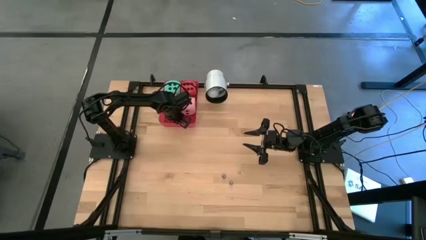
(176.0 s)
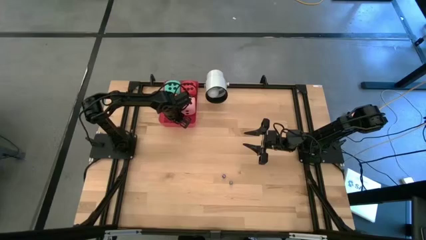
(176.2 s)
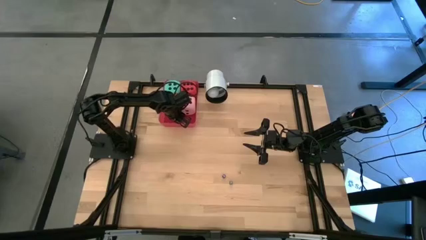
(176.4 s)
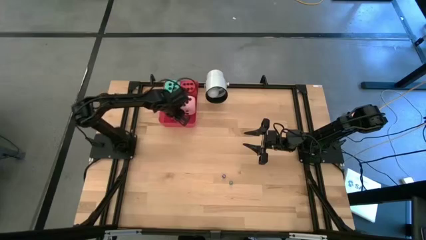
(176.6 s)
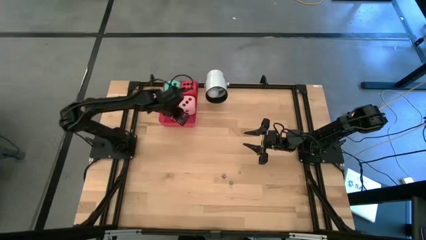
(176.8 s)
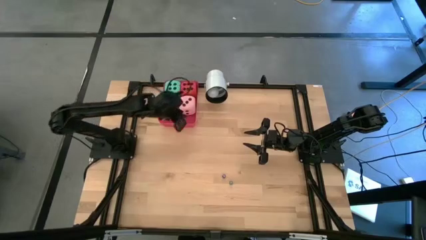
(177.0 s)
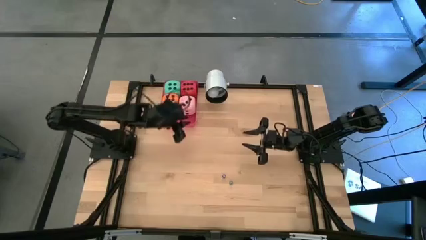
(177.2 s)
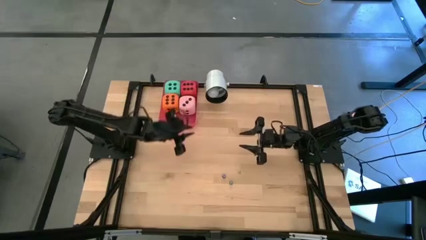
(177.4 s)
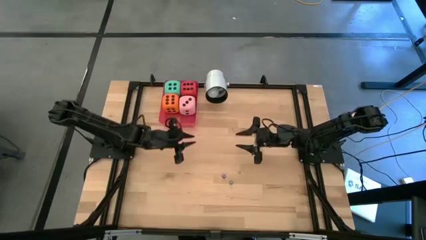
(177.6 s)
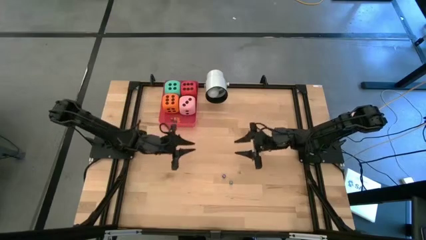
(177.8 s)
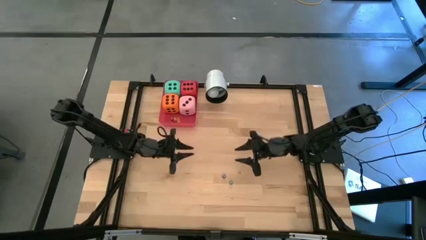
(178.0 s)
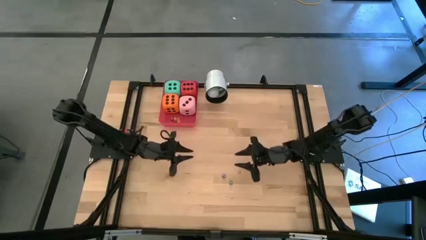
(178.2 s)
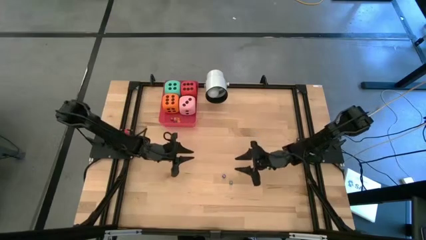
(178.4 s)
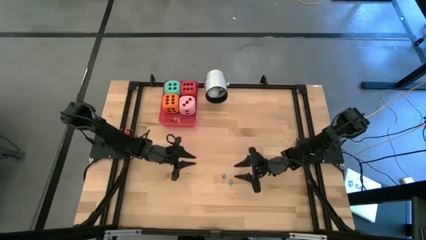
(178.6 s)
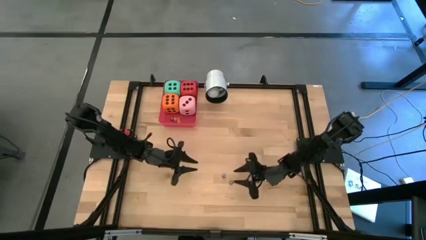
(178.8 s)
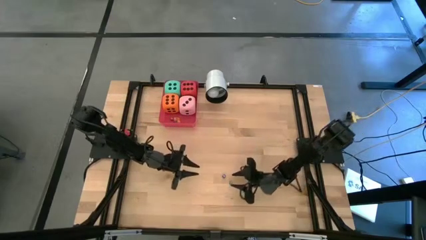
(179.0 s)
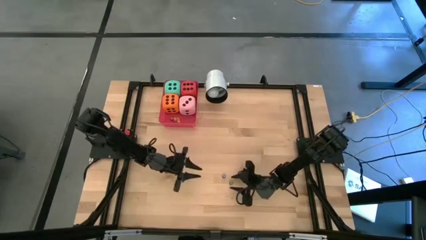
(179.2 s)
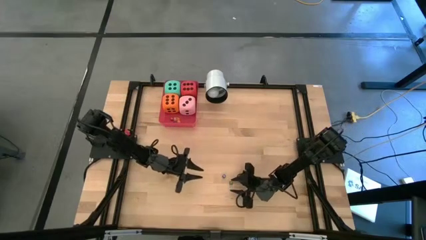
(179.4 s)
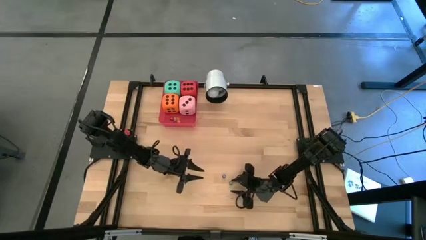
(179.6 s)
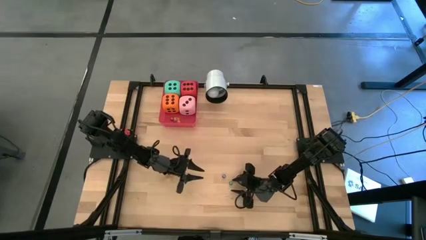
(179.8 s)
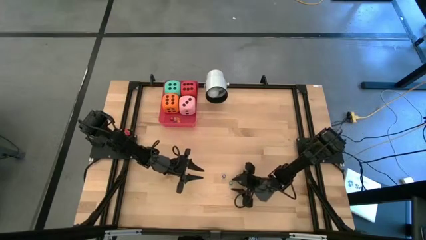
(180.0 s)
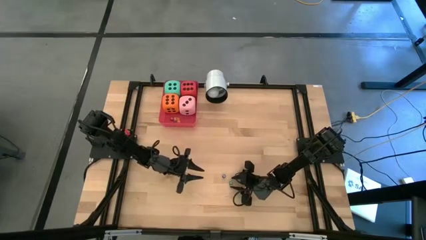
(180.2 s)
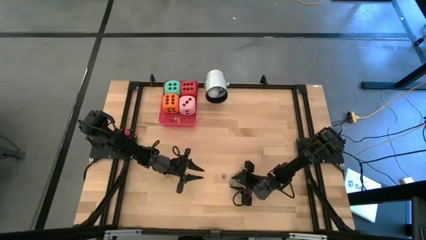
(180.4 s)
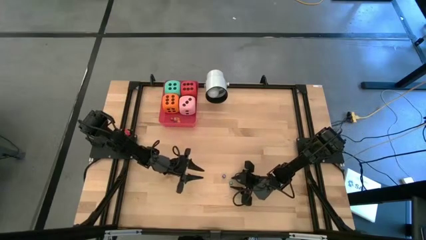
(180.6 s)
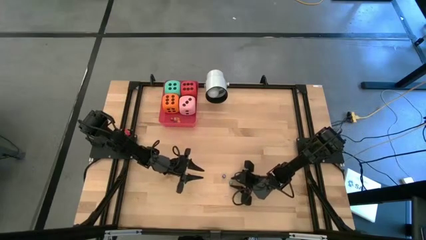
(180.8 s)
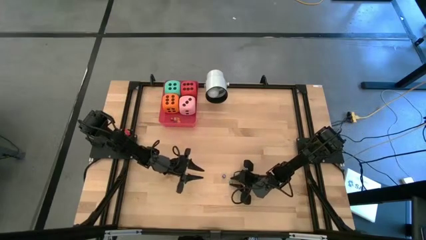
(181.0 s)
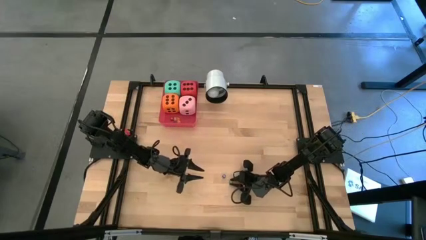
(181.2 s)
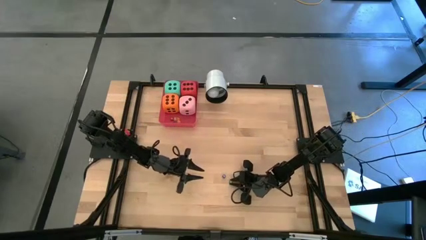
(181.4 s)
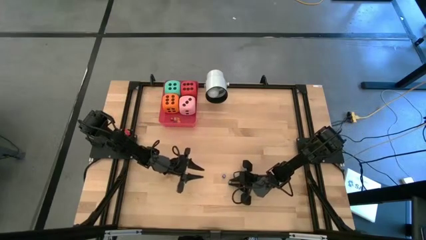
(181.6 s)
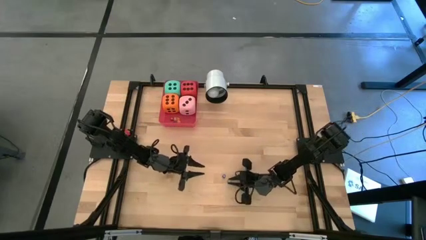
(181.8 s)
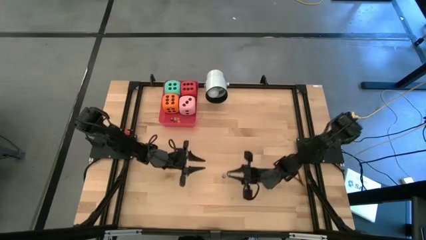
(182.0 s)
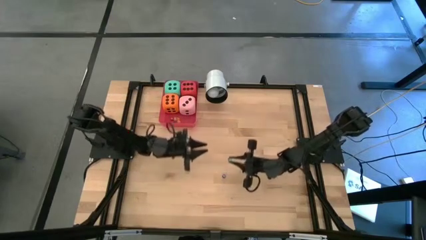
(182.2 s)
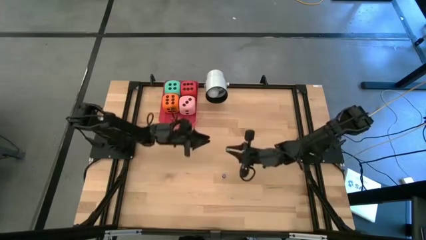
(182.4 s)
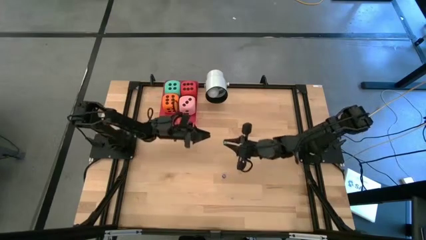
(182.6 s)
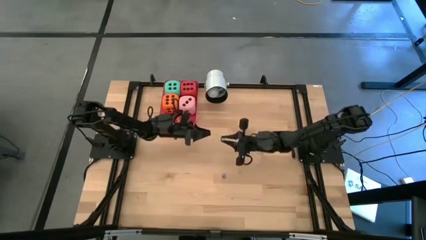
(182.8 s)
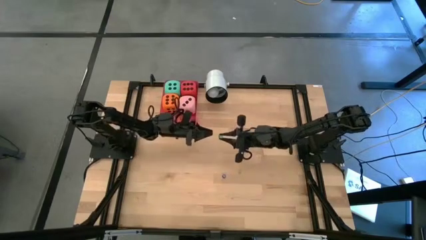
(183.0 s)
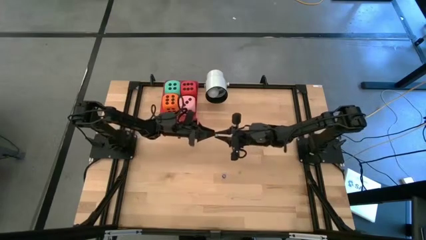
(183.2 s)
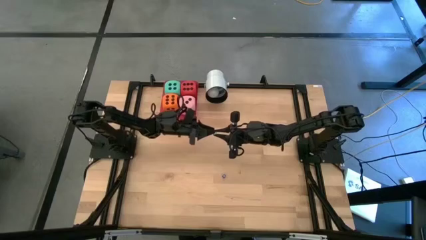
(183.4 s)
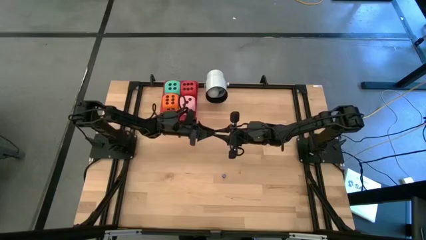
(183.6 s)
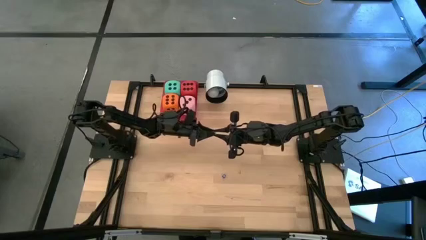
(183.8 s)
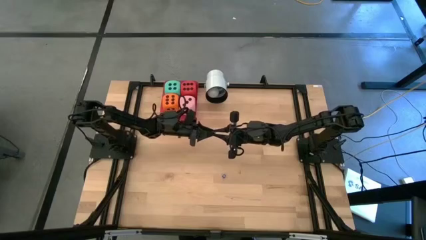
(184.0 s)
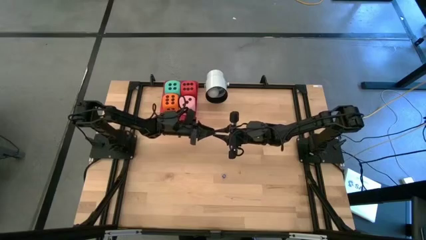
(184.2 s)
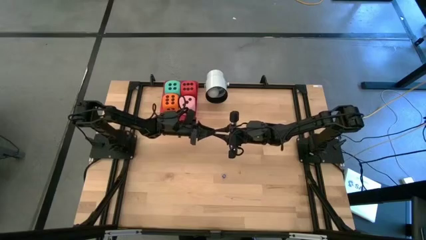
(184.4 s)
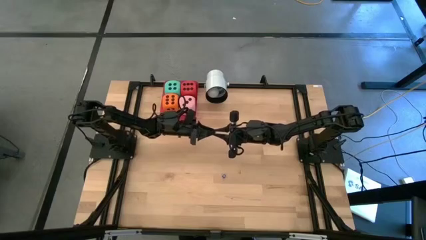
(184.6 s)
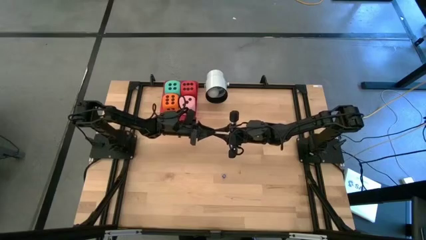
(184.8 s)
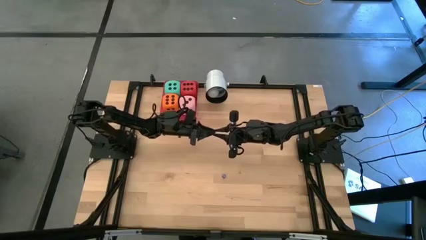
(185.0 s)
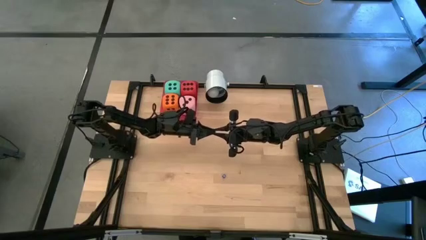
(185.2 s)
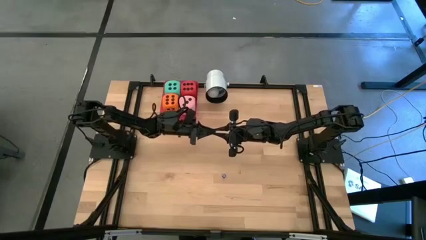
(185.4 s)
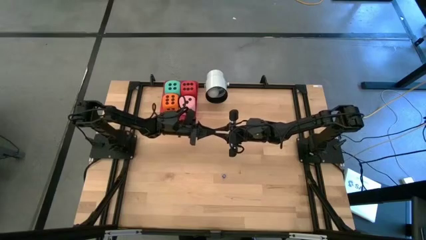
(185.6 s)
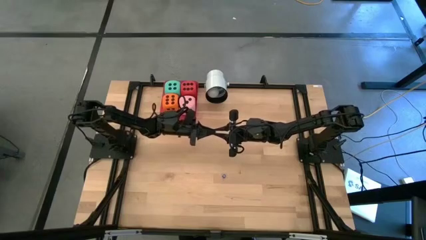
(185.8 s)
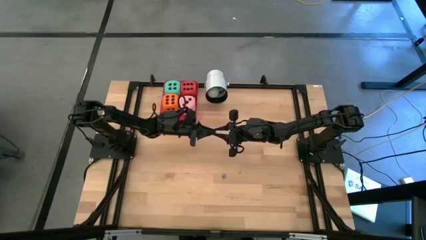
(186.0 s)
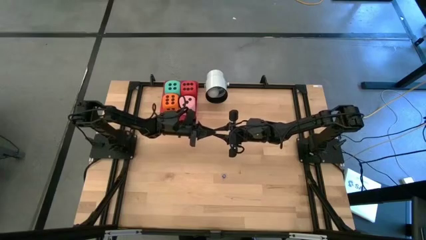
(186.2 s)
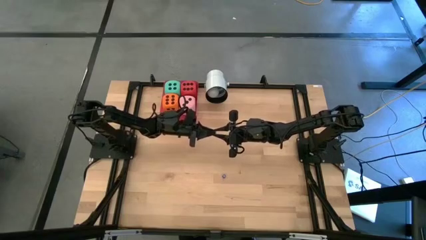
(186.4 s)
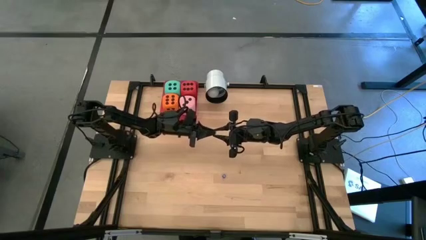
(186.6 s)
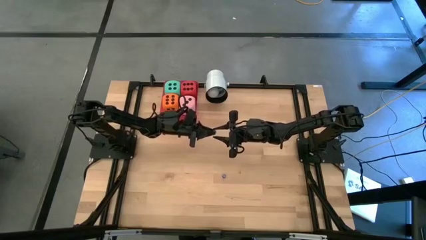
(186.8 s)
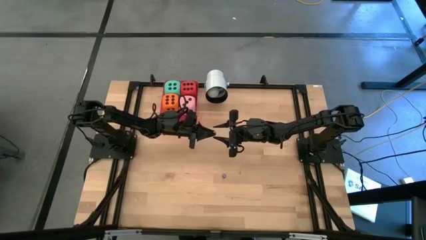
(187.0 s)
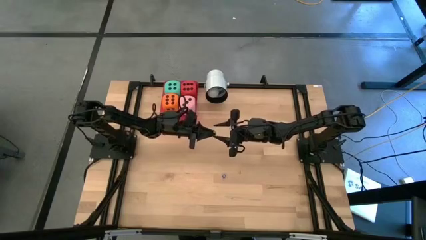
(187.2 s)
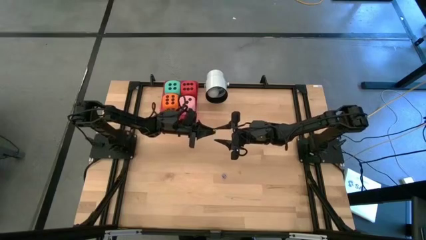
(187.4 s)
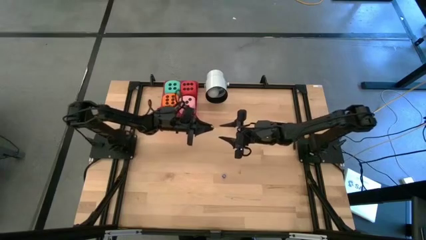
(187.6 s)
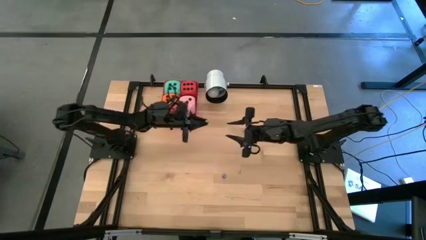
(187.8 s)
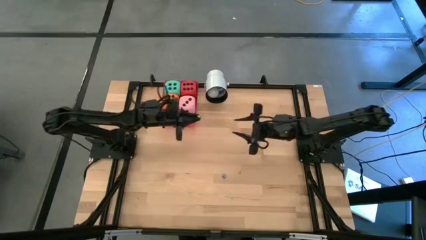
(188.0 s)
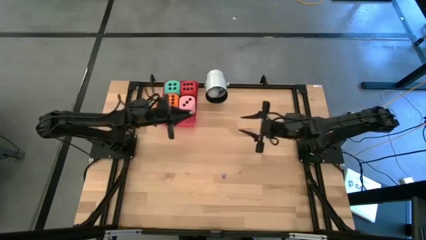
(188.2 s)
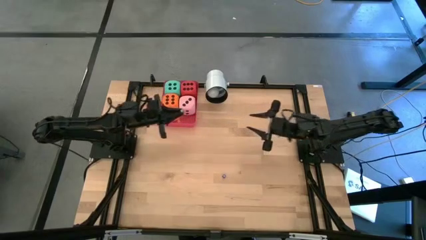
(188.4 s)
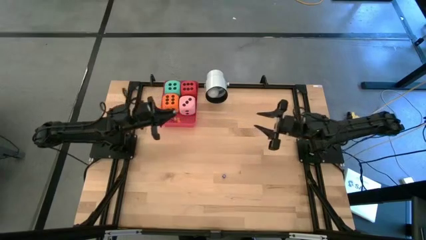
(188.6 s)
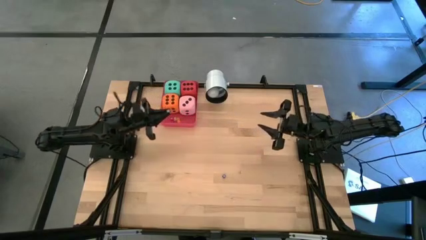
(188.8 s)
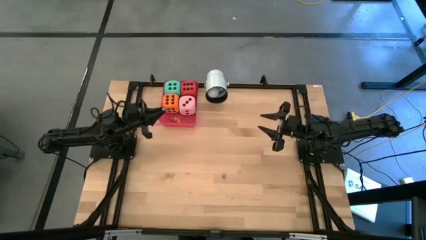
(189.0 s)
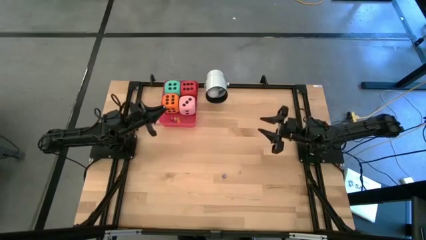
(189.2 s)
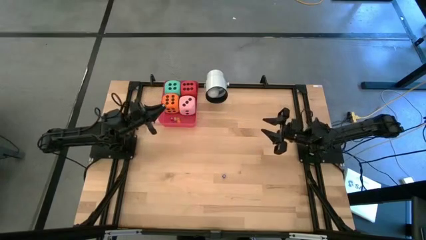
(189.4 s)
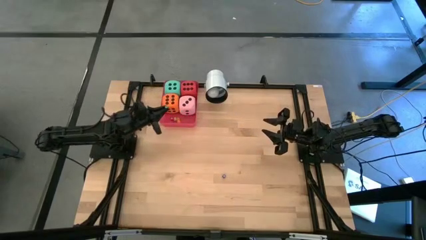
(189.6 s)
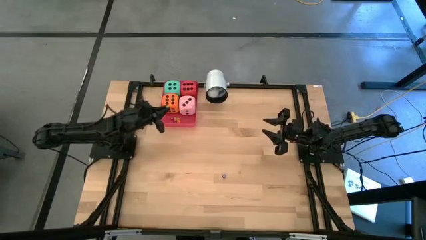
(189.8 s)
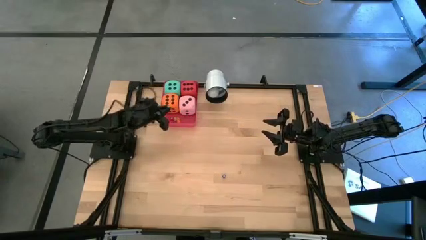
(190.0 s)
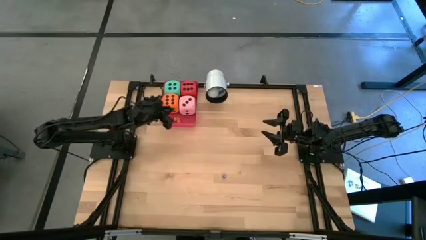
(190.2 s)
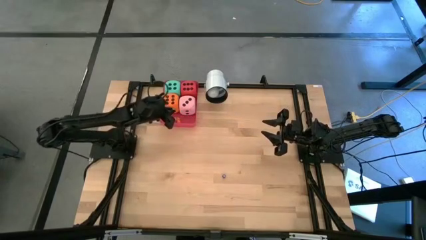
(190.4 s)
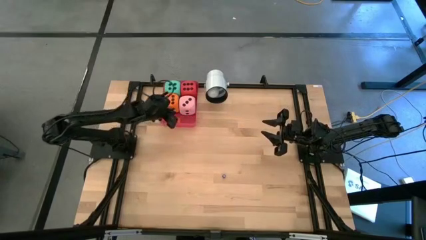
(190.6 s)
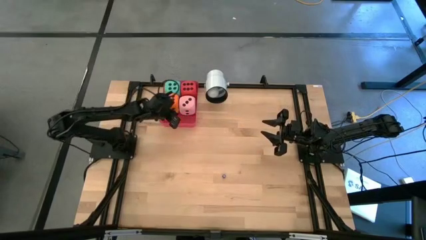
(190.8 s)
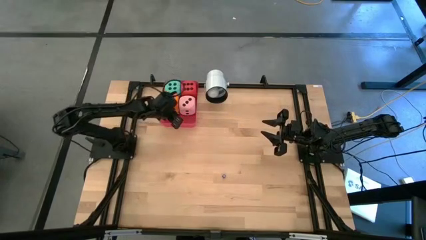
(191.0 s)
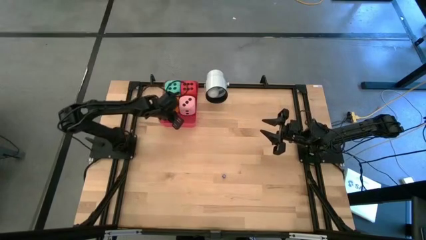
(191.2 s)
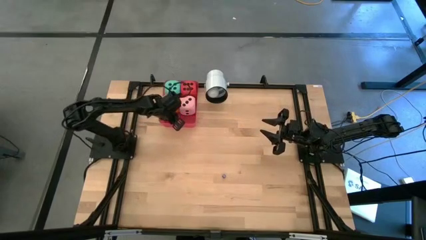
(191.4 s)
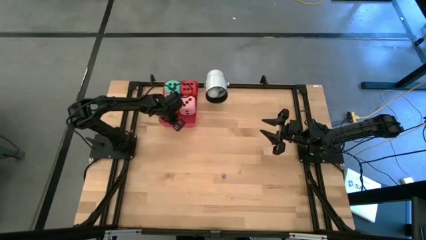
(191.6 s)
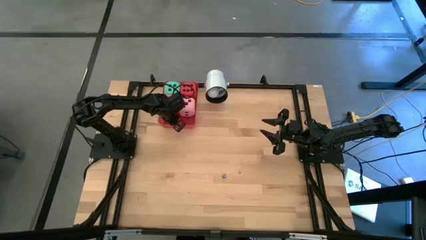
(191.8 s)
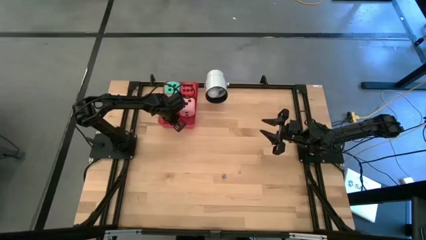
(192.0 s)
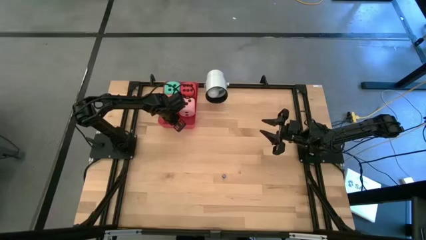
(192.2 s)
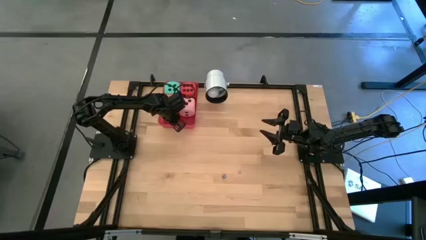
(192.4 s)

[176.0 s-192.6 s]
Task: Pick & Place Dice
Put the small green dice into the red bin

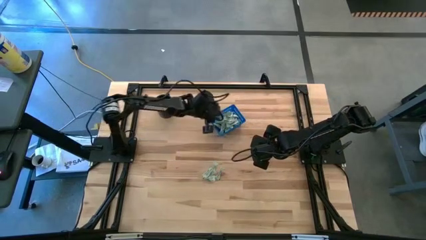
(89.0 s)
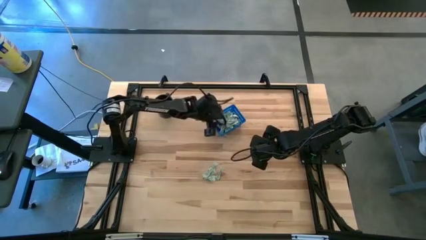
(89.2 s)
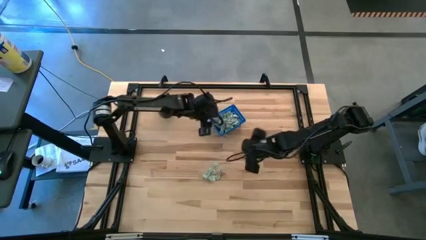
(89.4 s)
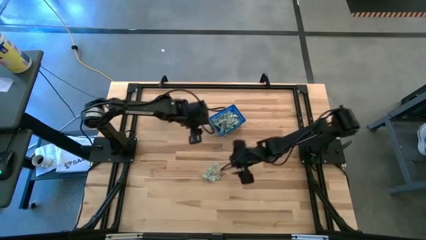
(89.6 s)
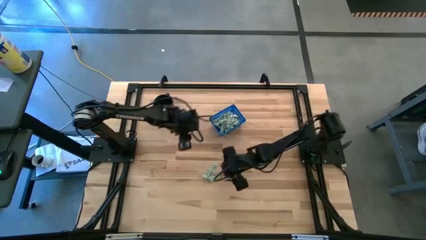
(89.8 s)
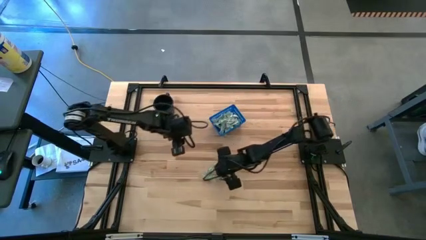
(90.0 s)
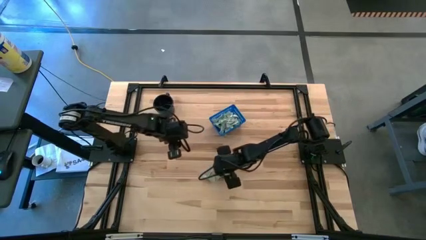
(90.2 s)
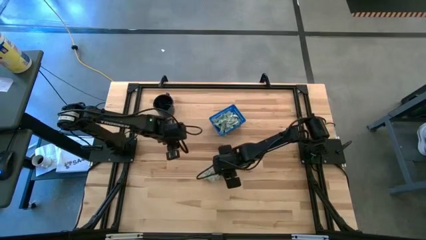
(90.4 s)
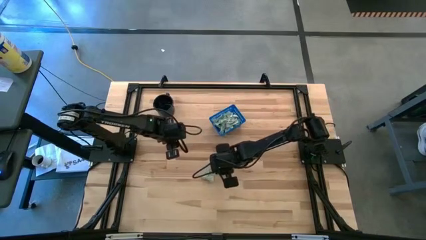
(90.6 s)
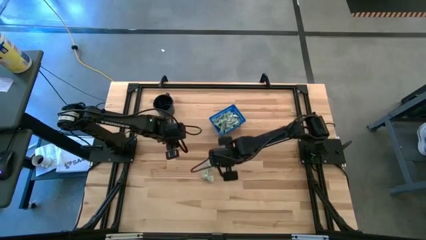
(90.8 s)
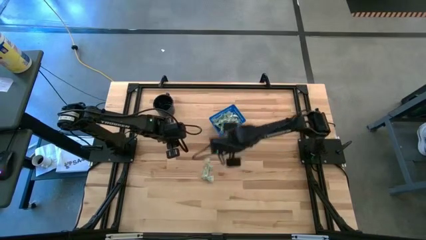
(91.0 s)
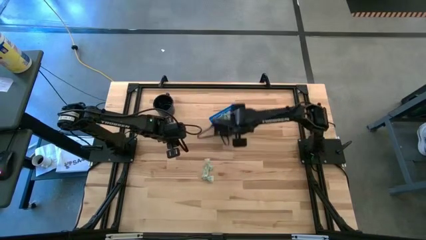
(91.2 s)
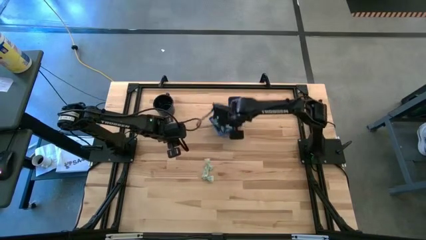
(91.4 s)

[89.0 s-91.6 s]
Task: Pick and place Stevia / Truvia into bins
Put the green stevia packet into the blue bin
